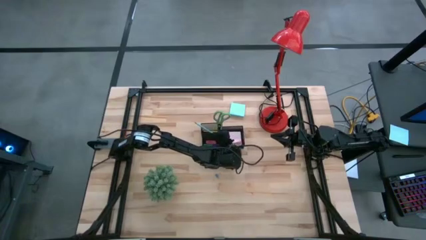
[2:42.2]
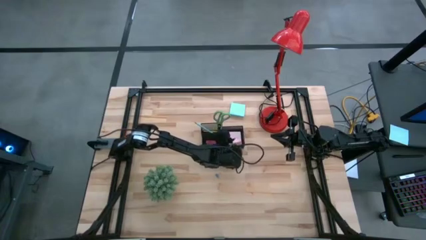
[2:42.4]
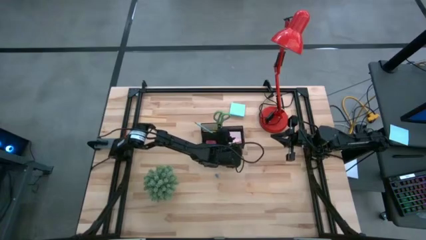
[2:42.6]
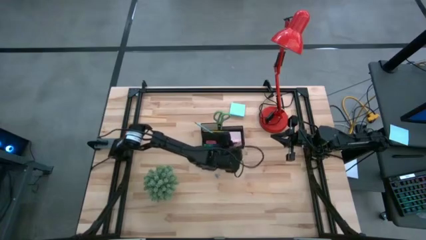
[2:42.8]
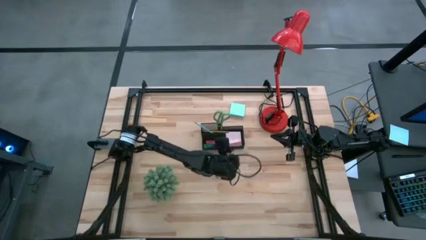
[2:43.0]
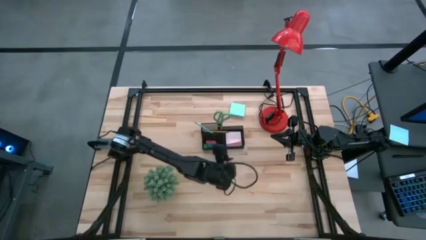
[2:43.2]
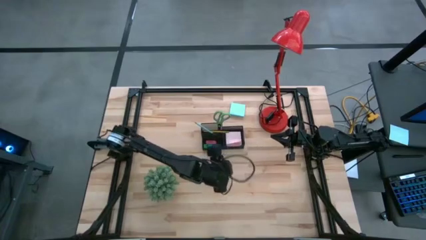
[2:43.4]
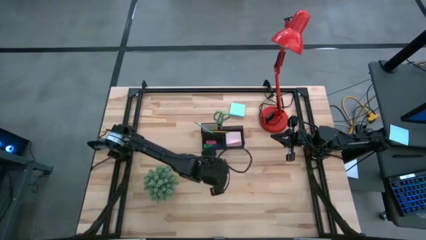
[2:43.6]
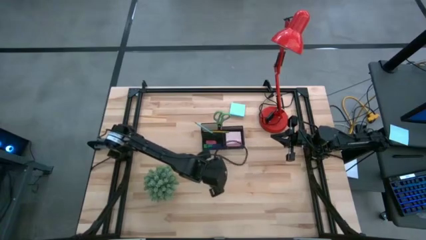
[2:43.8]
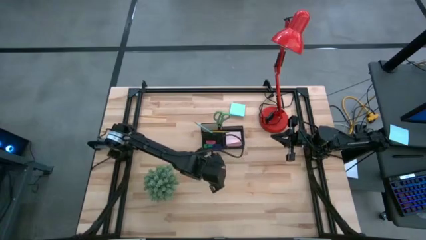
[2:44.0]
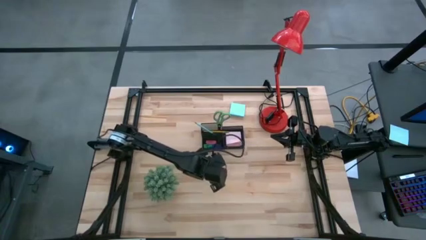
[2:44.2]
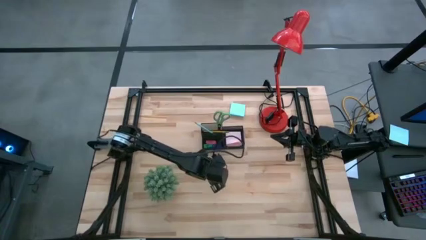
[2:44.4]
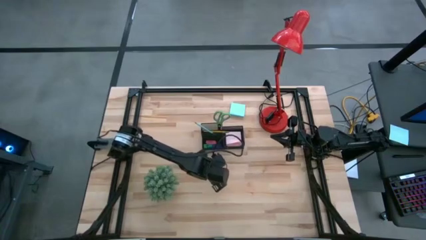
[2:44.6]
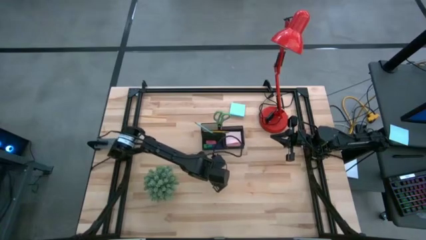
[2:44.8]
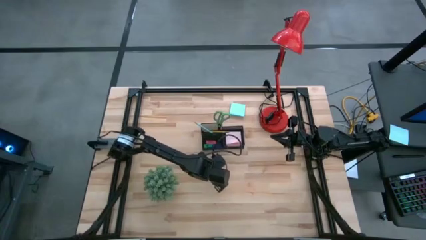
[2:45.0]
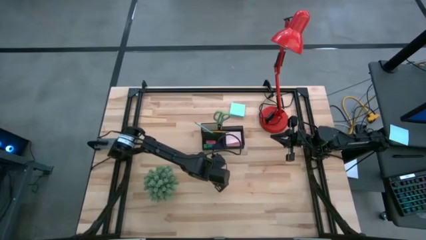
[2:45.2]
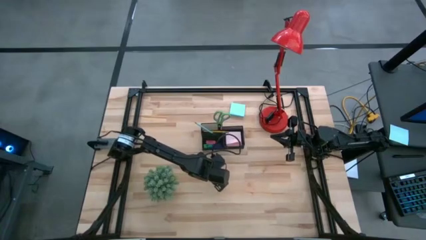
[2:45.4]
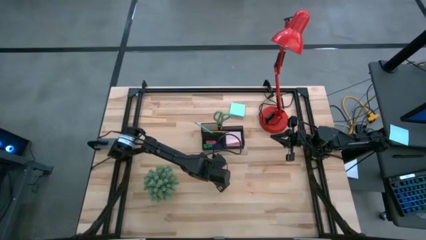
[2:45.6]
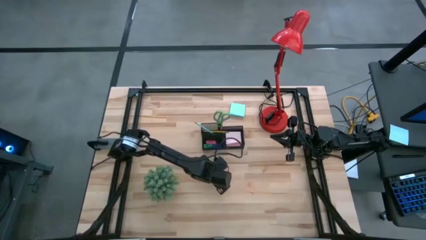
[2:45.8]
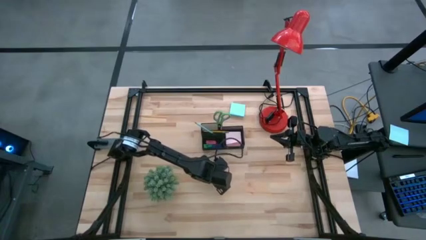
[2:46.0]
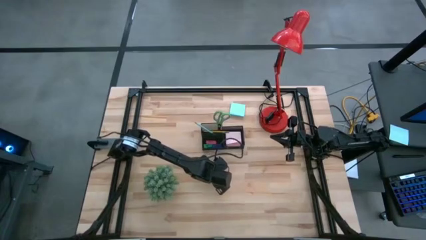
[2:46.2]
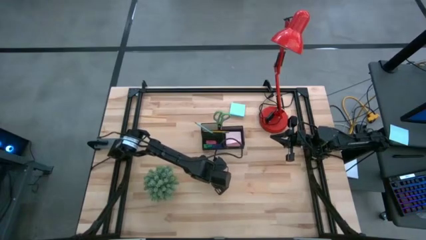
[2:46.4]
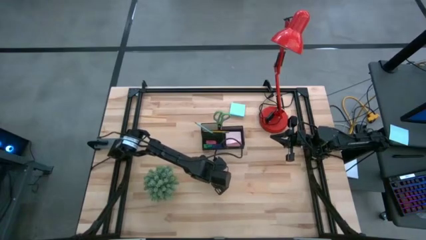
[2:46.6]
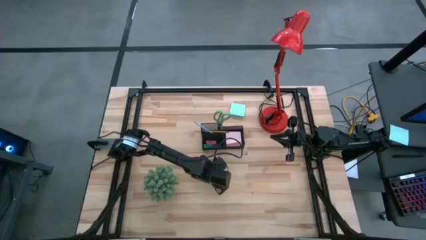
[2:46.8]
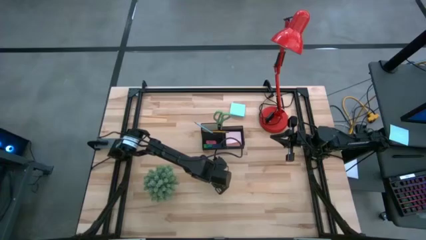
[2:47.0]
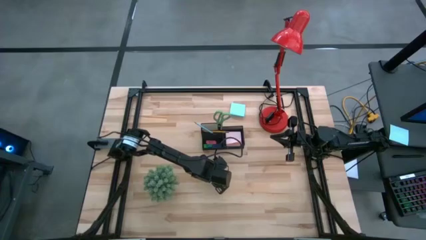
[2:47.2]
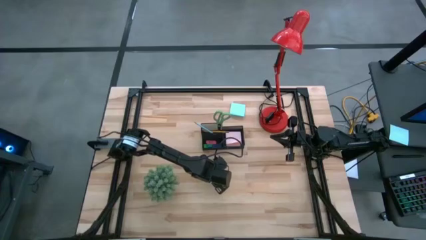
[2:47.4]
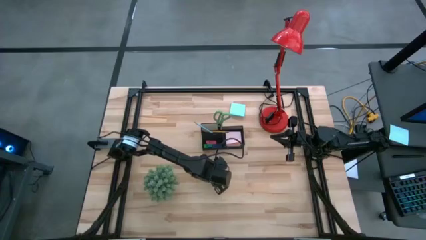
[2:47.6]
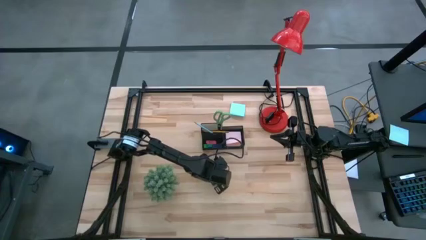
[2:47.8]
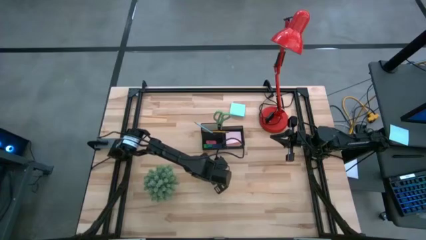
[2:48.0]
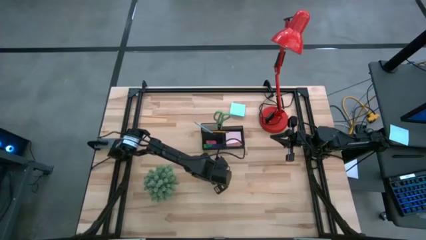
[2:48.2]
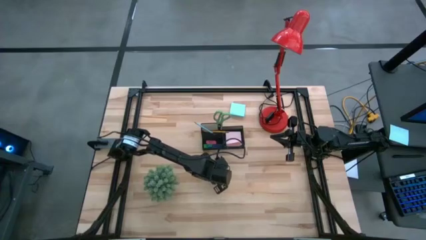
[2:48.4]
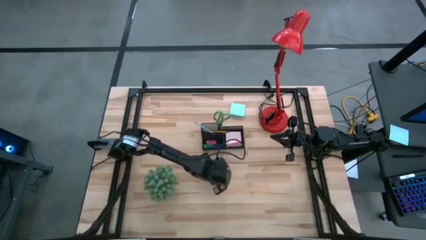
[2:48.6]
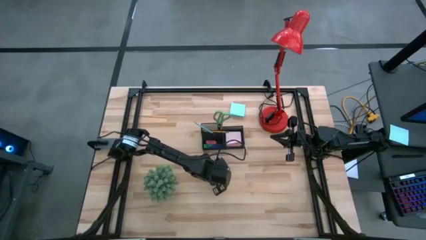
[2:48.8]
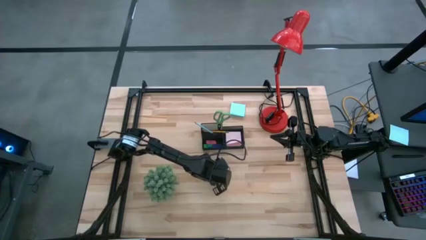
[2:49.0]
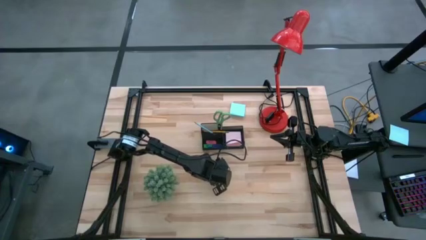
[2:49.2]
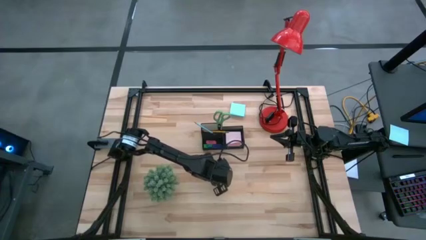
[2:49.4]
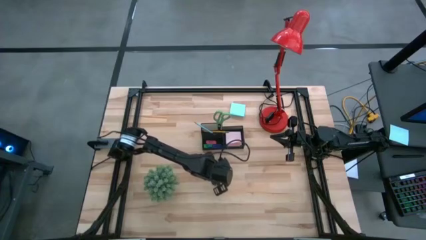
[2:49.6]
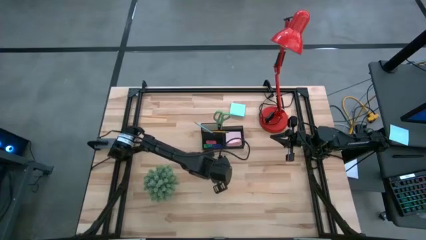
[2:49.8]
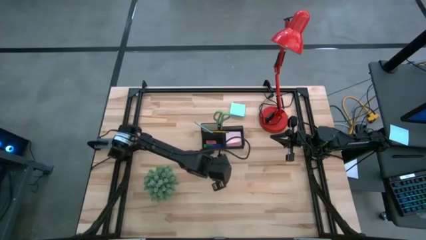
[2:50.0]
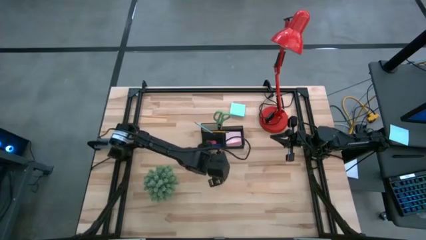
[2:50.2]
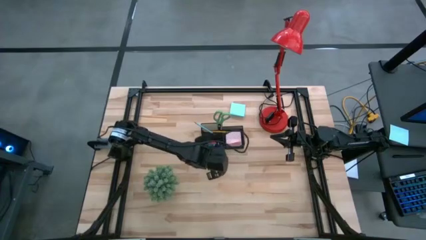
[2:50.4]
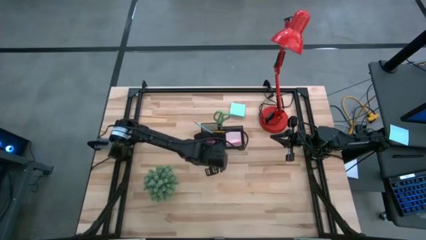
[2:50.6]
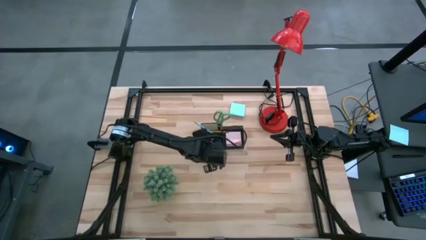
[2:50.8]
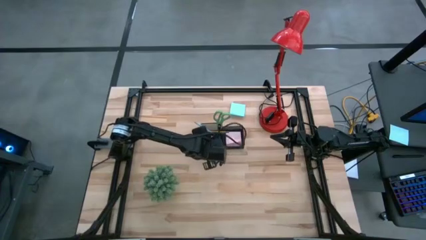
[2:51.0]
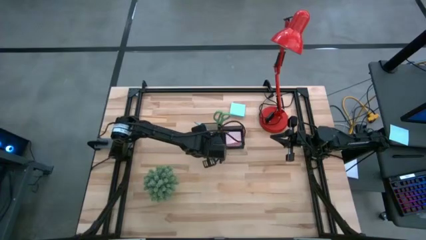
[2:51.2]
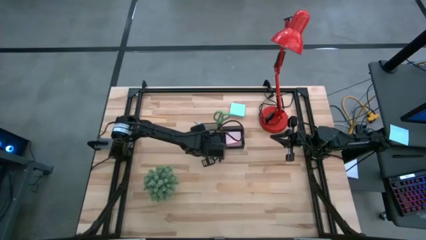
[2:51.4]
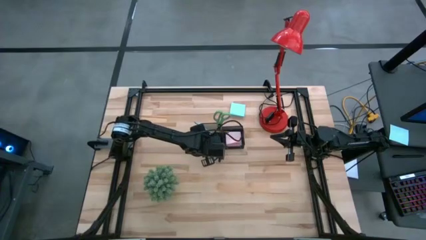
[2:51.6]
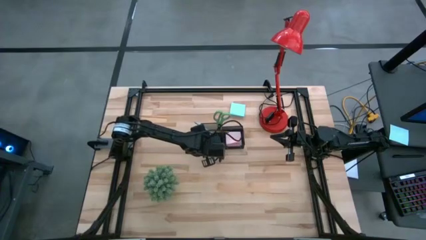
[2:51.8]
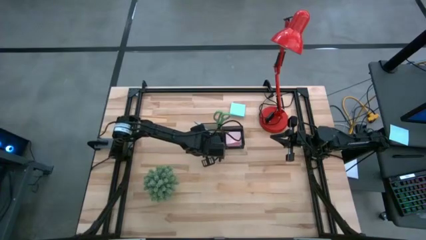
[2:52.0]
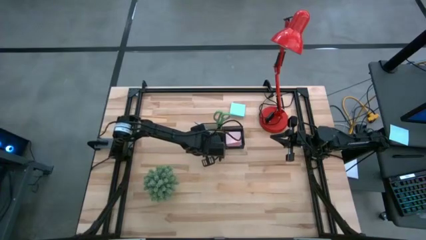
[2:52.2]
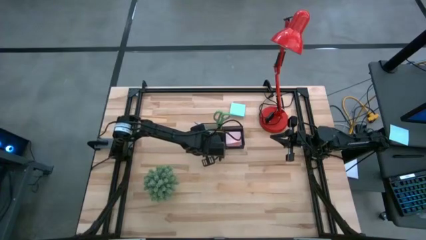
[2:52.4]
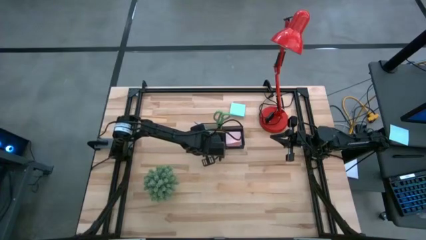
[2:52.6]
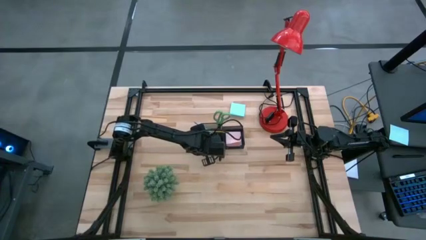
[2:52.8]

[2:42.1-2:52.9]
Task: Pick and place office supplies into organizer
Put the blue binder clip into the black desk organizer

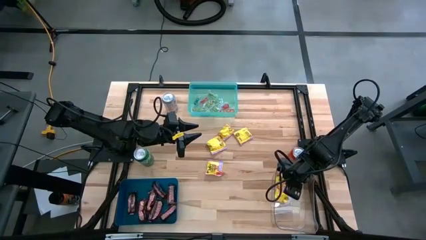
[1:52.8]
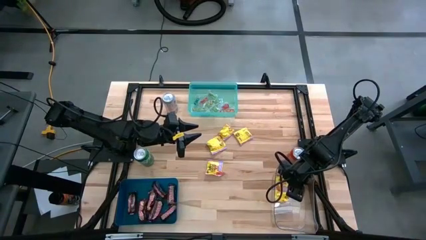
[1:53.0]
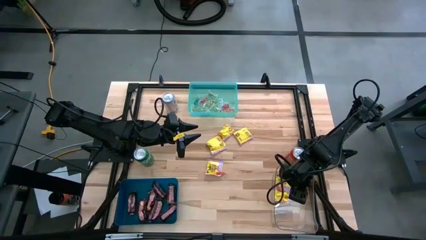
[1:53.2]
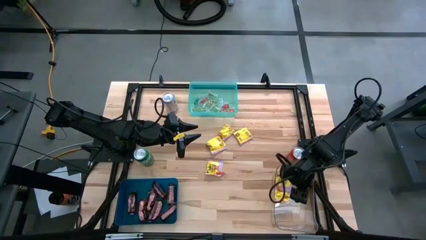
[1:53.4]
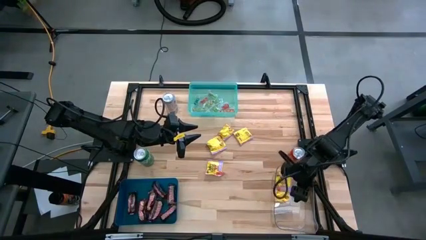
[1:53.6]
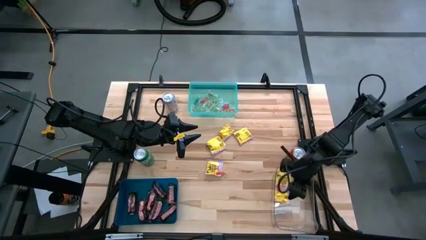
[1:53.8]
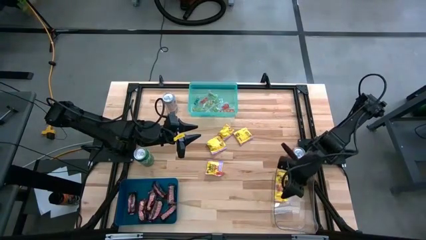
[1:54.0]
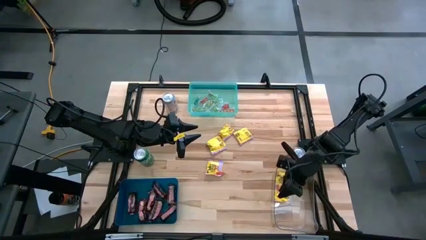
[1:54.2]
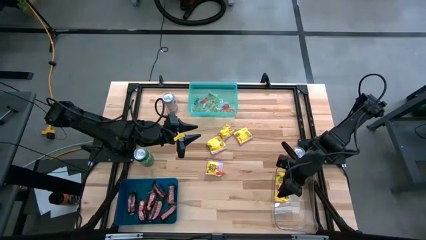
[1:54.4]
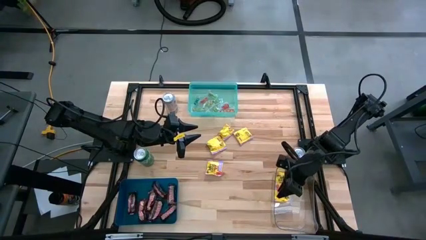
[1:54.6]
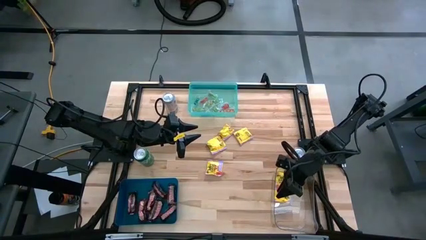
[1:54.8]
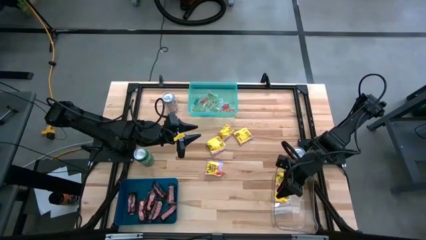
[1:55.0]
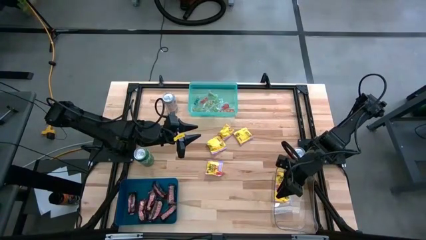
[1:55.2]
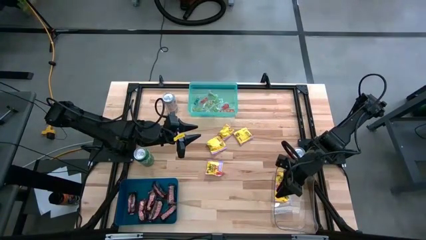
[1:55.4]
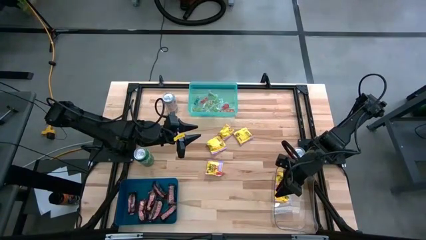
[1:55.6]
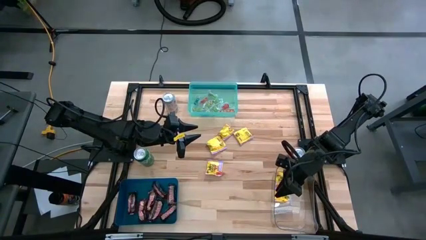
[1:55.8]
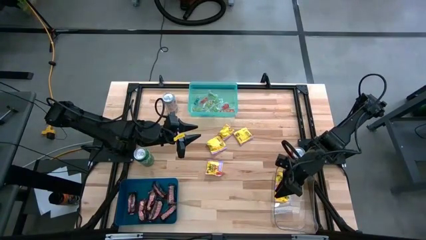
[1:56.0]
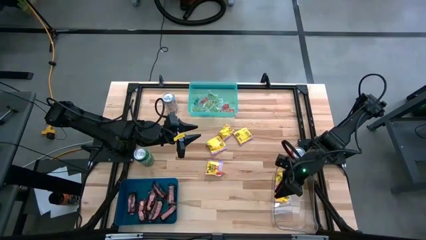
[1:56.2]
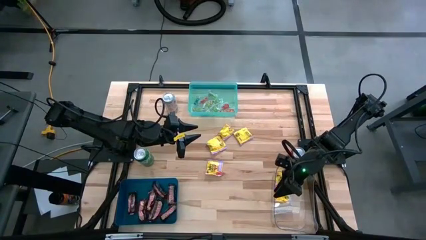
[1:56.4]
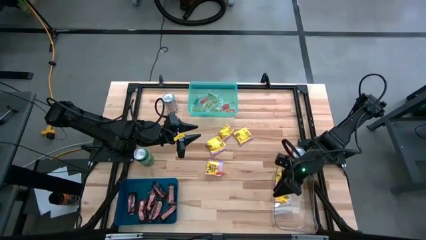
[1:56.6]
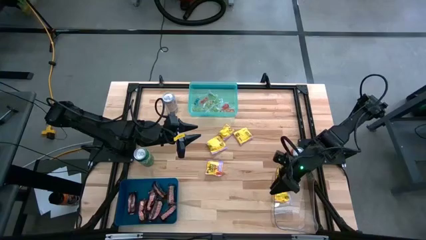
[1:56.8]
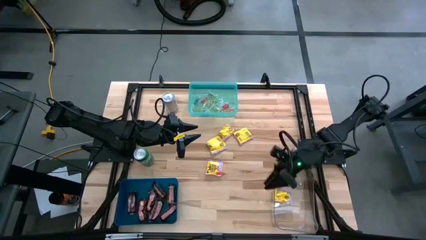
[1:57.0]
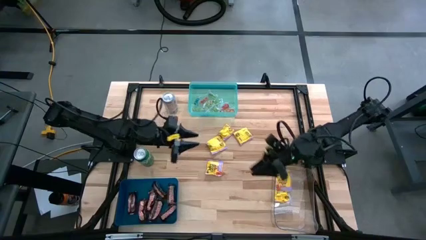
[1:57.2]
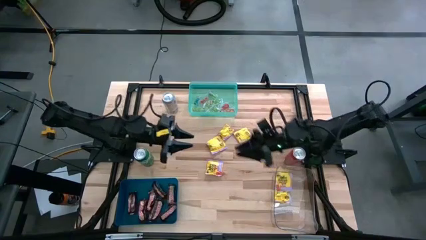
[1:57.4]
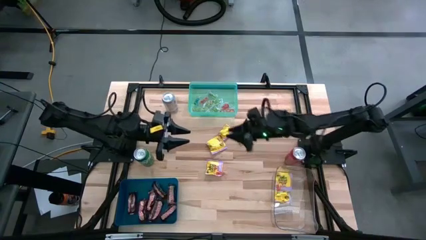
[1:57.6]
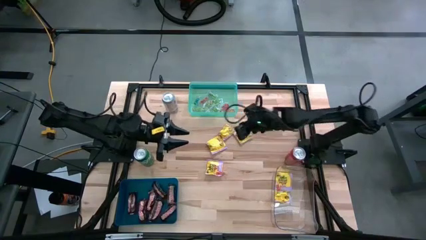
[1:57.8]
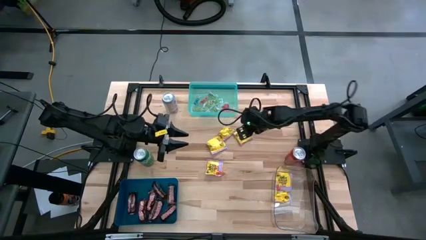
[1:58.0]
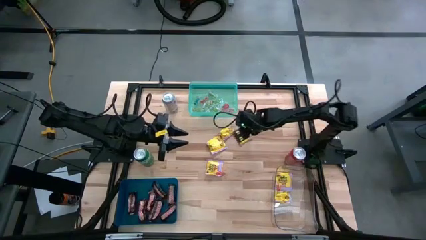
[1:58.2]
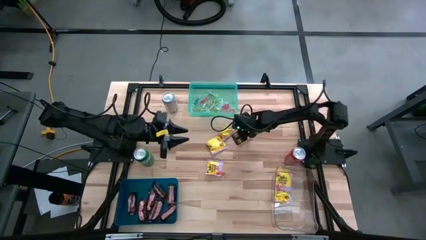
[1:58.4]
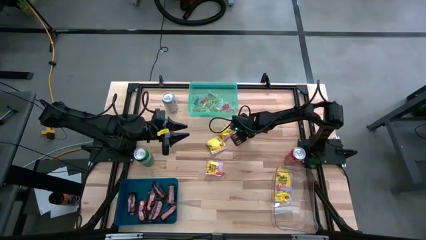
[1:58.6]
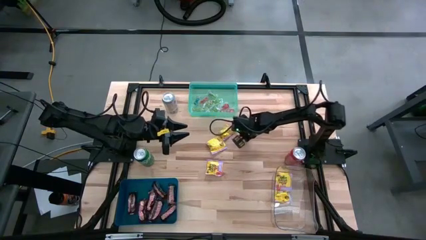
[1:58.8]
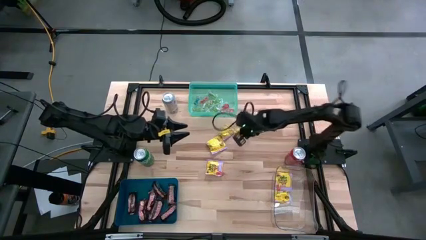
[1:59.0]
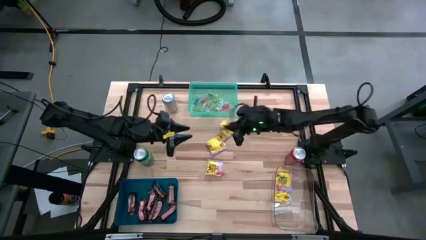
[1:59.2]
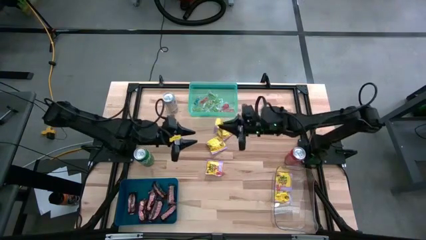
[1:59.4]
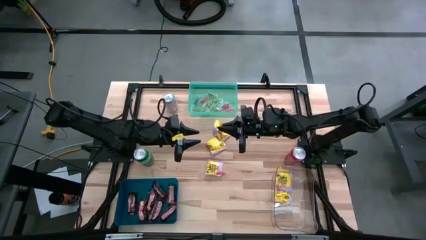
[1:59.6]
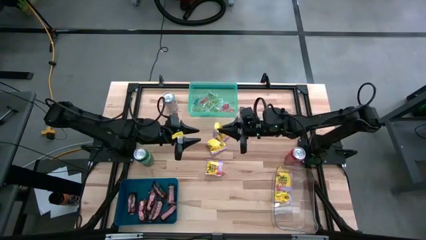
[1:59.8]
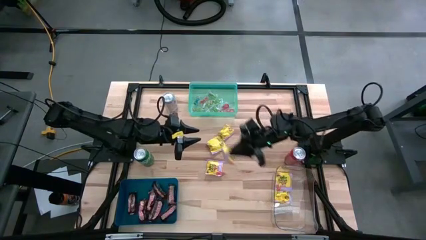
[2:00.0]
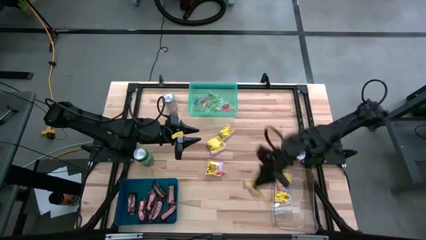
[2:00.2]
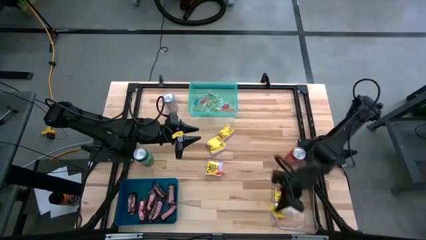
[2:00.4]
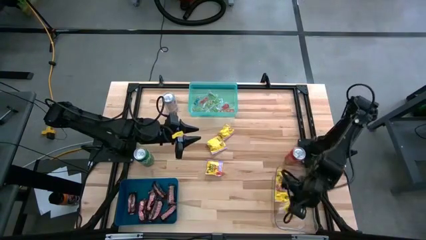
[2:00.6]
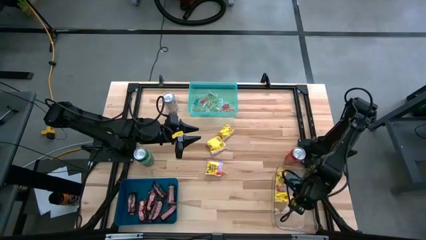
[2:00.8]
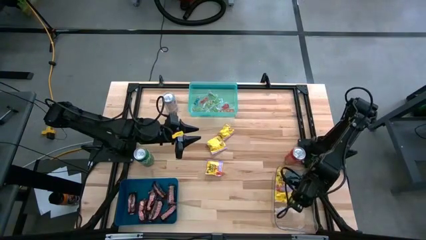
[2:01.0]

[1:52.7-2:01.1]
Task: Sort candy
Put the yellow candy into the transparent bin
